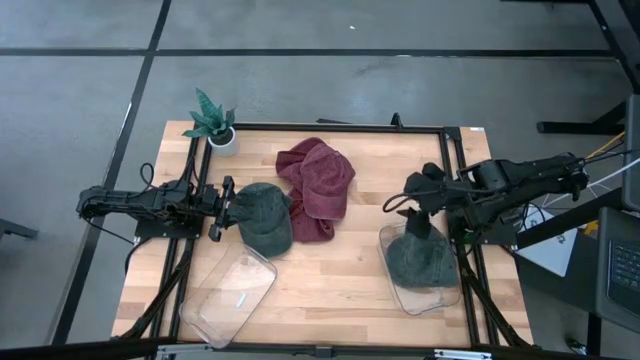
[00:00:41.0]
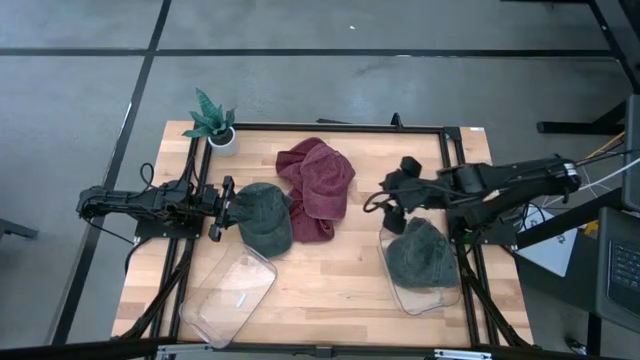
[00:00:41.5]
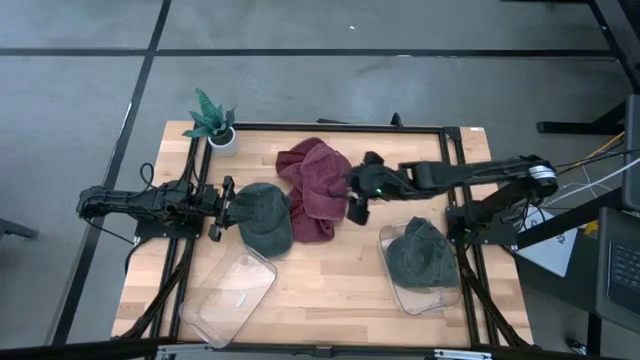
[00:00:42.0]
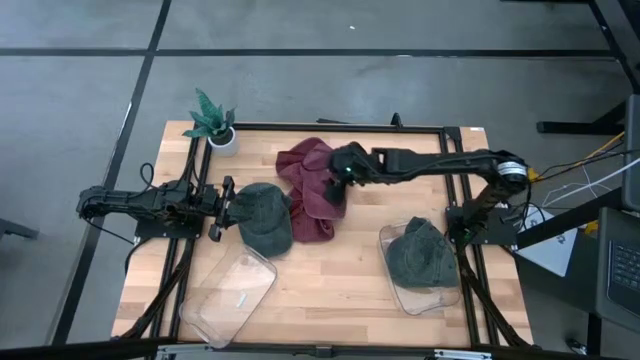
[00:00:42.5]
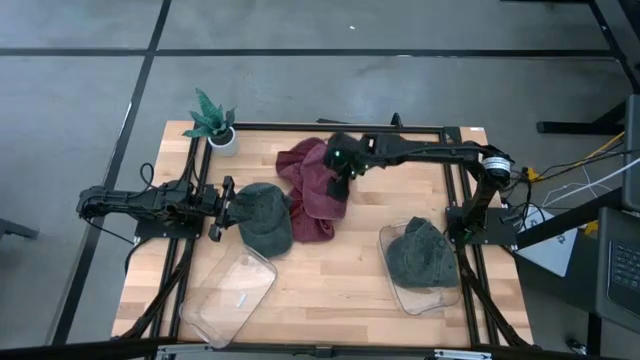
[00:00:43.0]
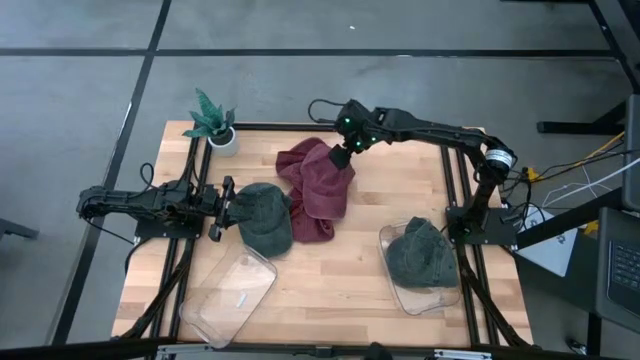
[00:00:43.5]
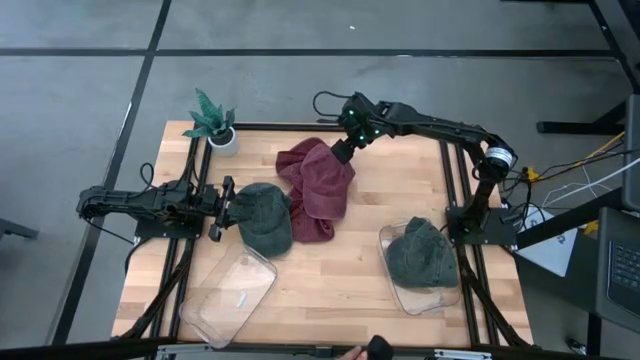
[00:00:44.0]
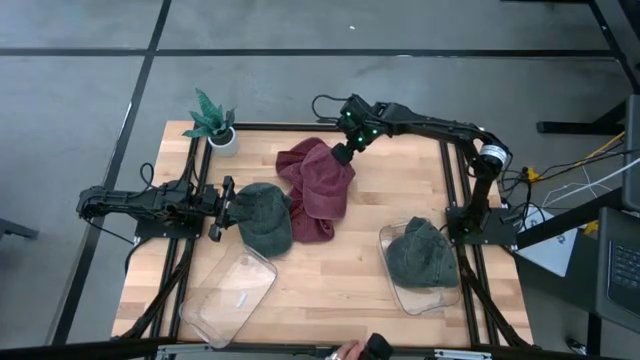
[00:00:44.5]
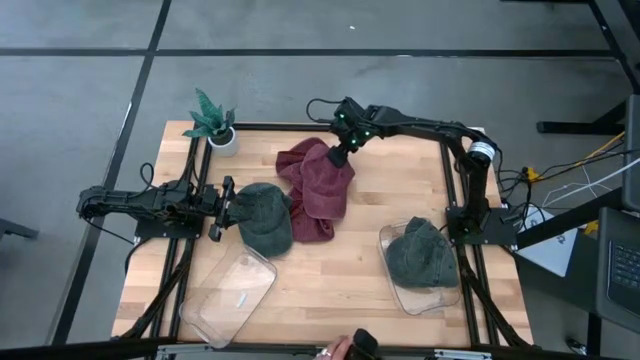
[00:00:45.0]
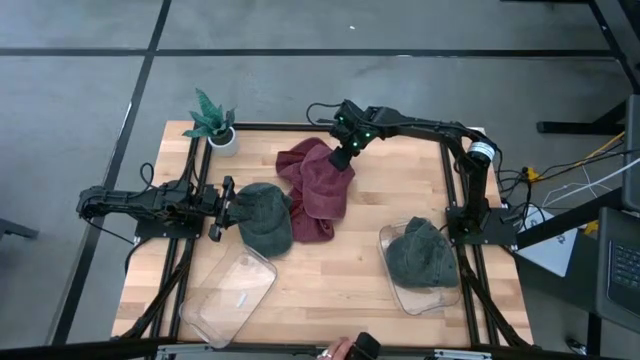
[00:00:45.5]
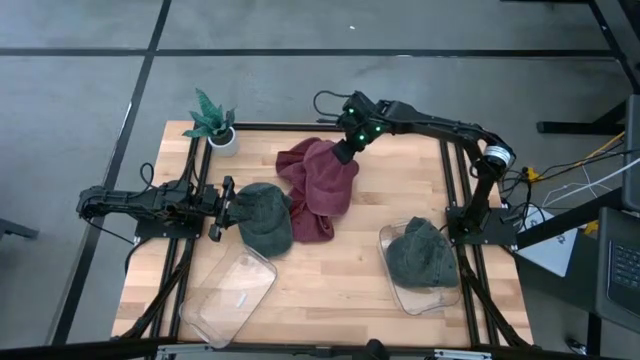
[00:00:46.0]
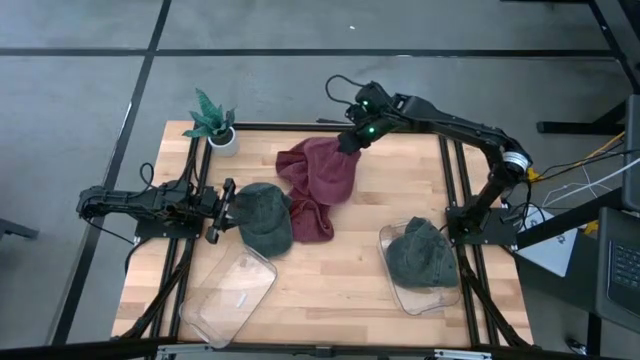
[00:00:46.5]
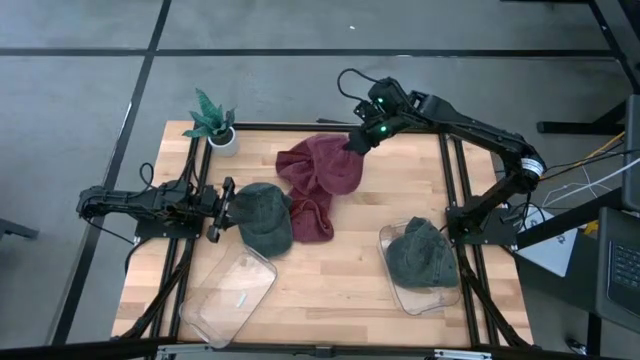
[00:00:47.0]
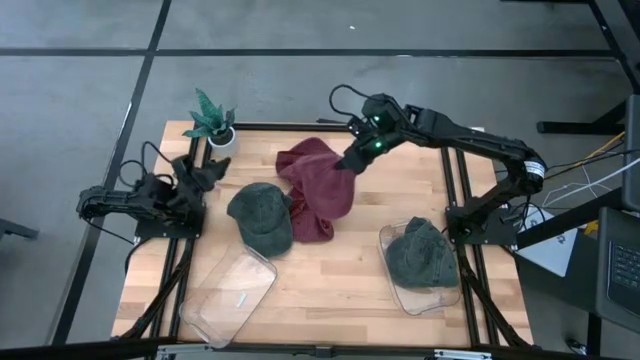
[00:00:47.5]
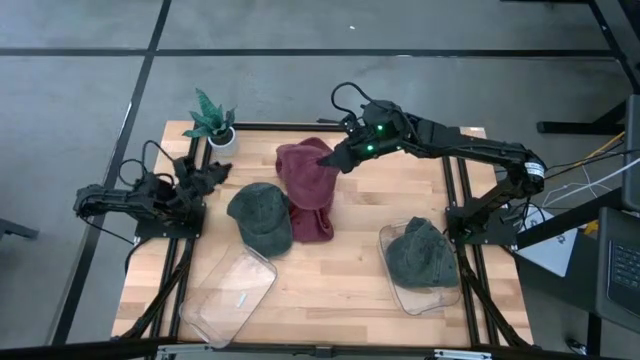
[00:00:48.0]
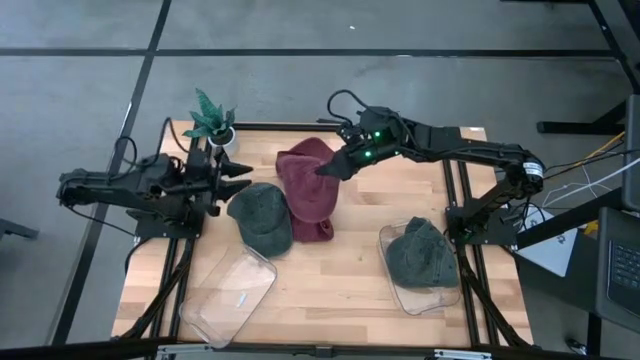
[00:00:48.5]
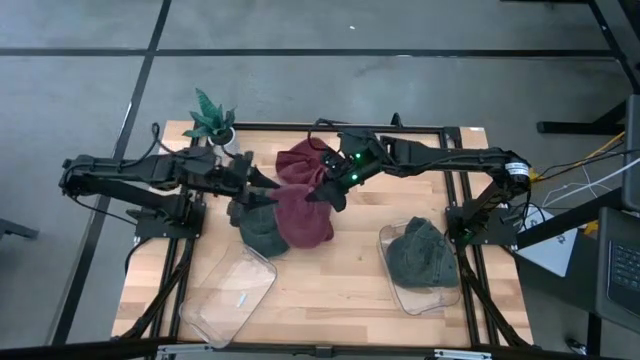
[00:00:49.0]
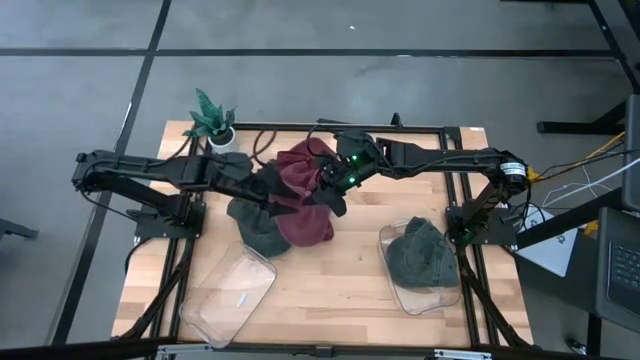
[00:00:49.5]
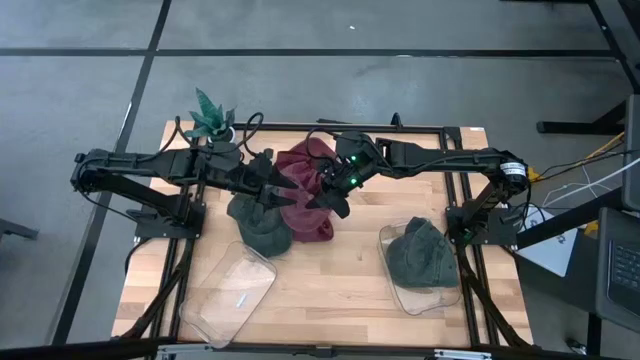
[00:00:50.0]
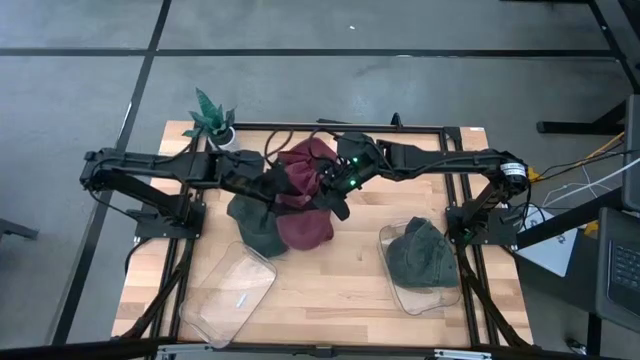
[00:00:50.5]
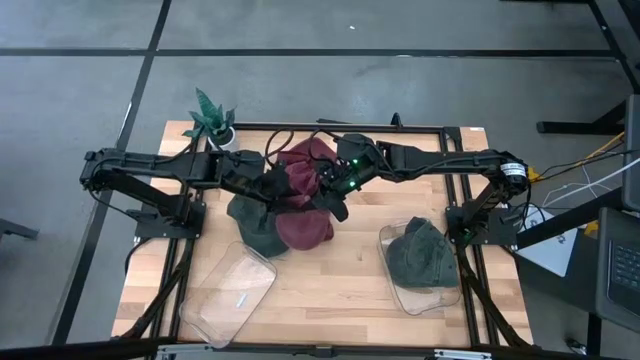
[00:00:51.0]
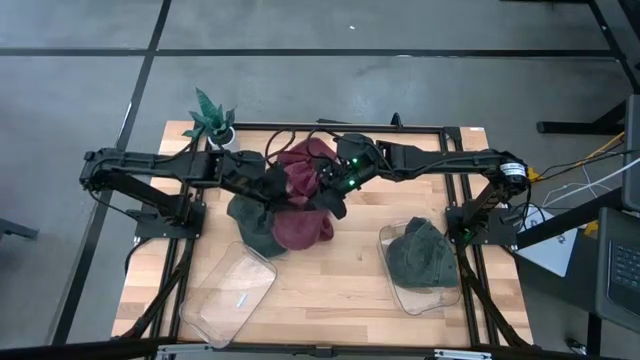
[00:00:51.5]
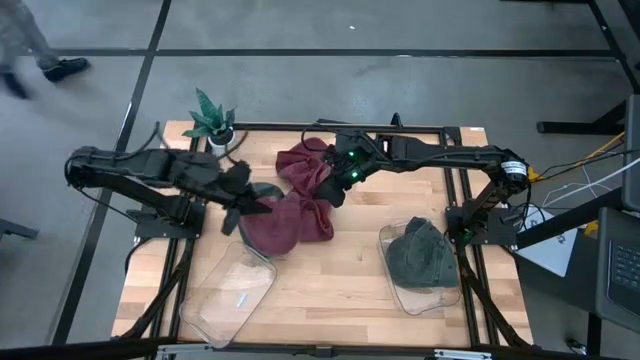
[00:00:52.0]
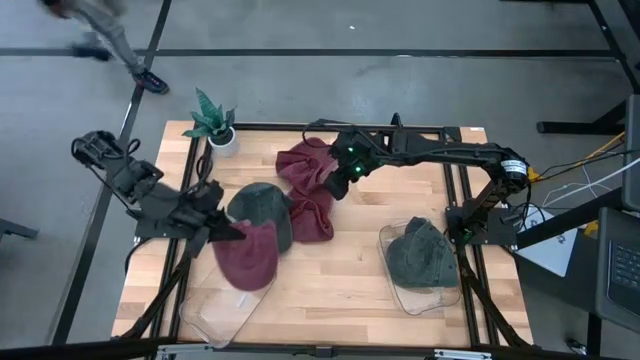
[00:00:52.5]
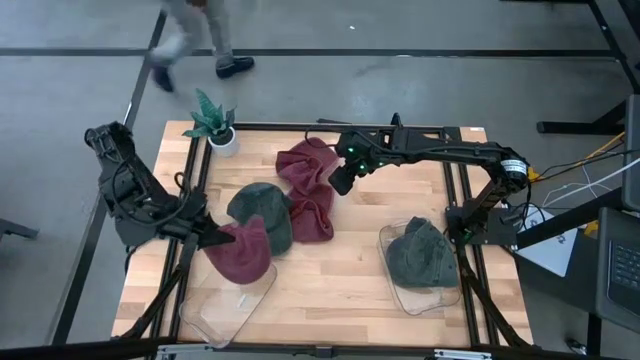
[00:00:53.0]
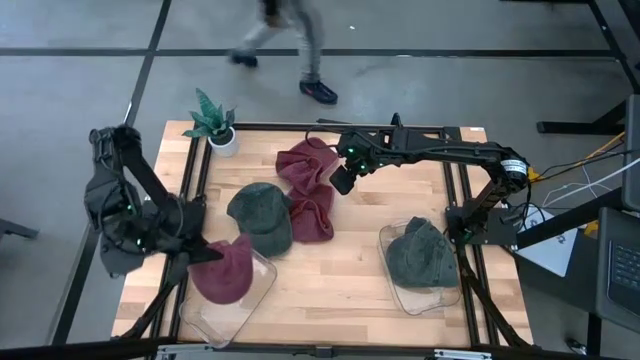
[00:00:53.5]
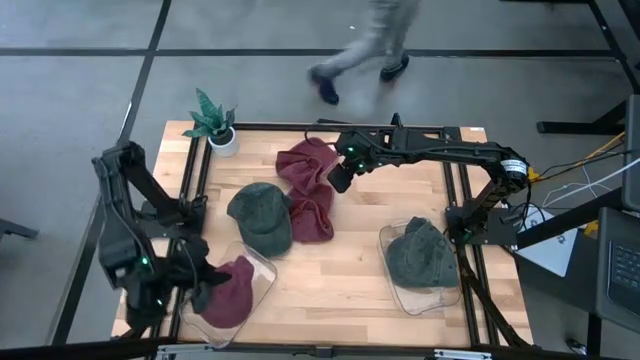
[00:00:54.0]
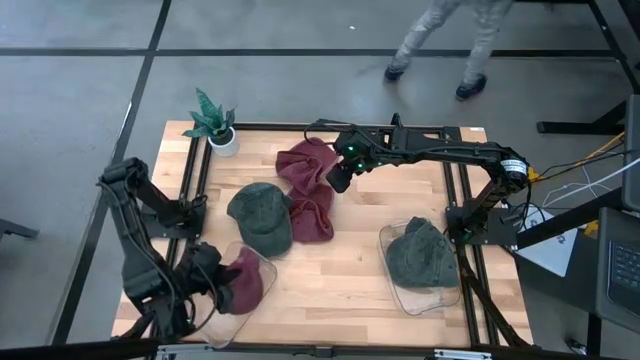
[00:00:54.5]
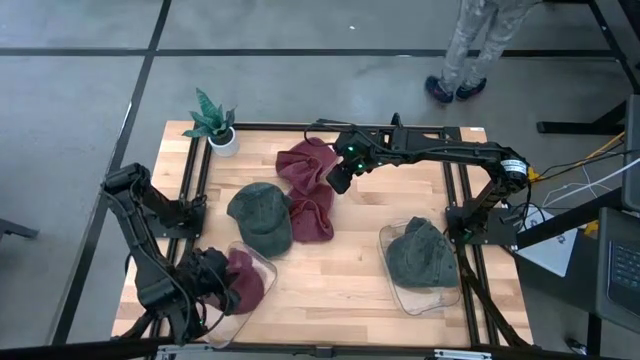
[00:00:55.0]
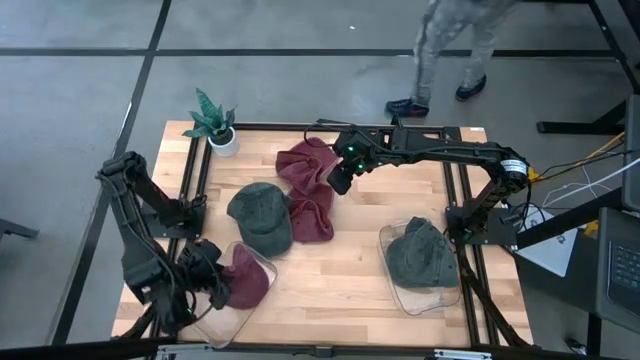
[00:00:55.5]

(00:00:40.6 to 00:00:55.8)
Task: Pick & Place hat
Put the right red cap into the left transparent bin

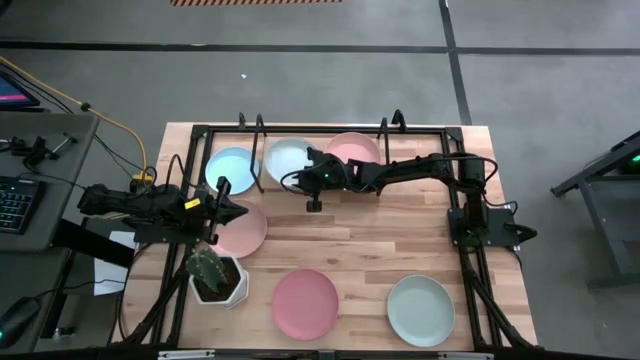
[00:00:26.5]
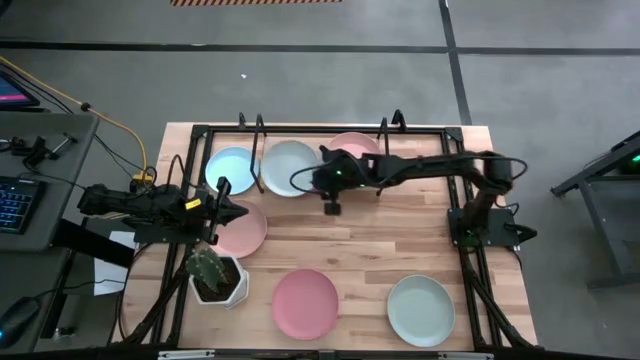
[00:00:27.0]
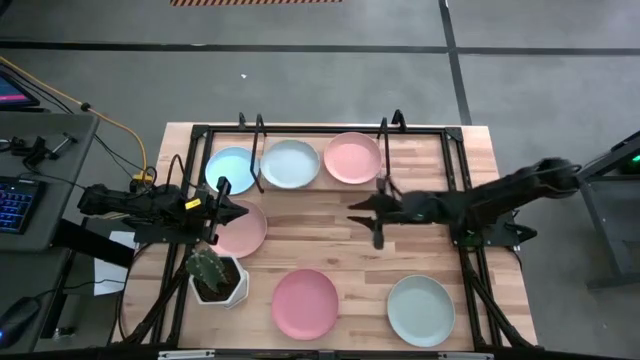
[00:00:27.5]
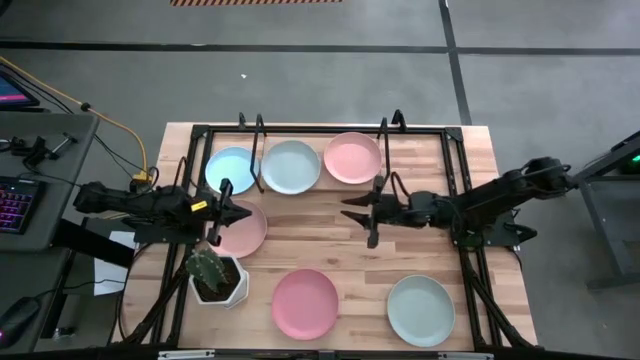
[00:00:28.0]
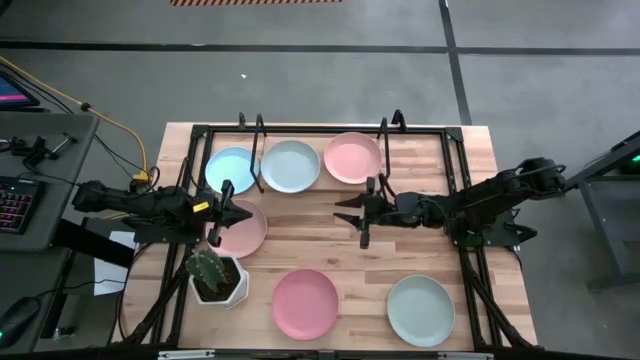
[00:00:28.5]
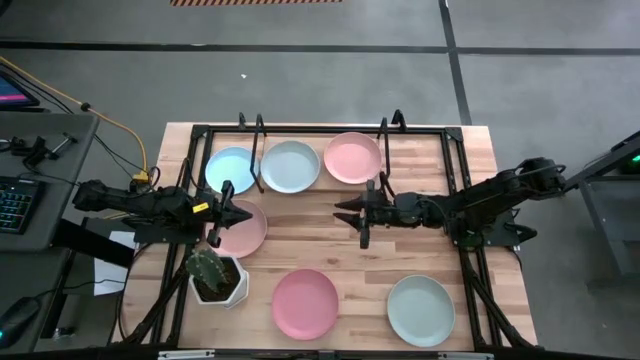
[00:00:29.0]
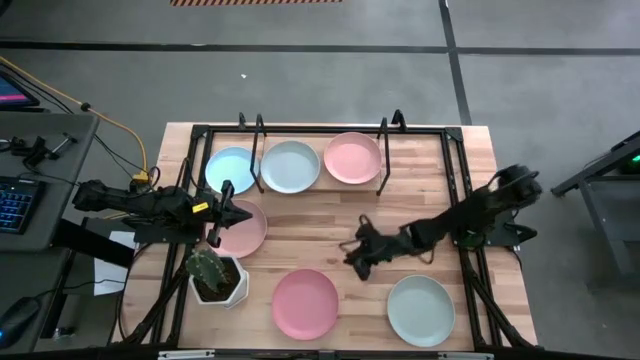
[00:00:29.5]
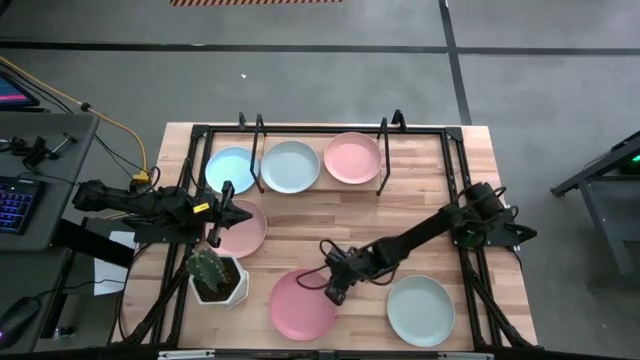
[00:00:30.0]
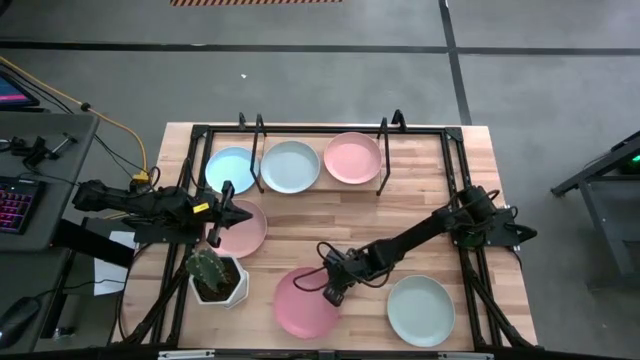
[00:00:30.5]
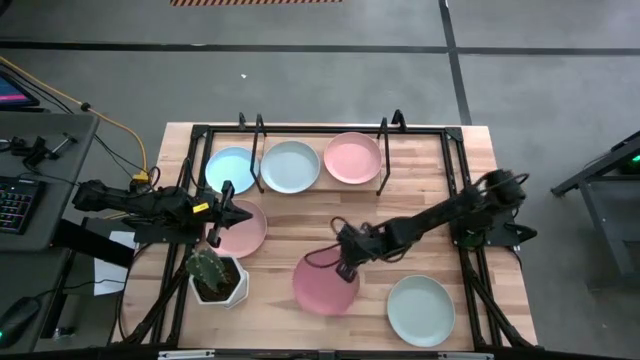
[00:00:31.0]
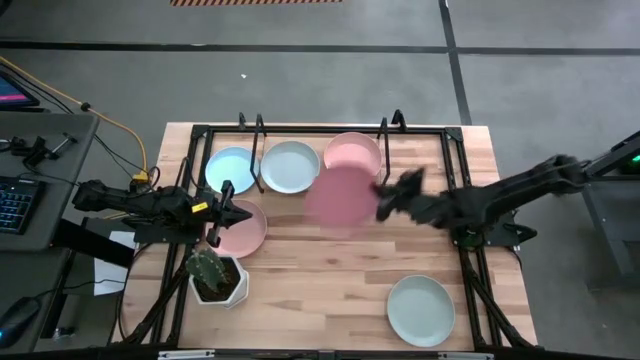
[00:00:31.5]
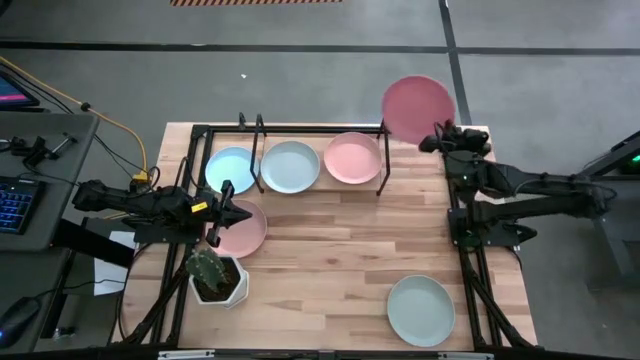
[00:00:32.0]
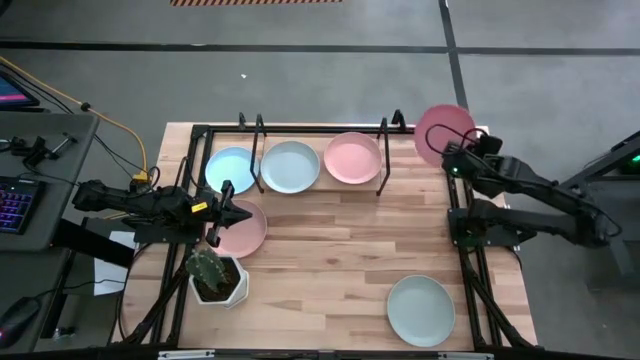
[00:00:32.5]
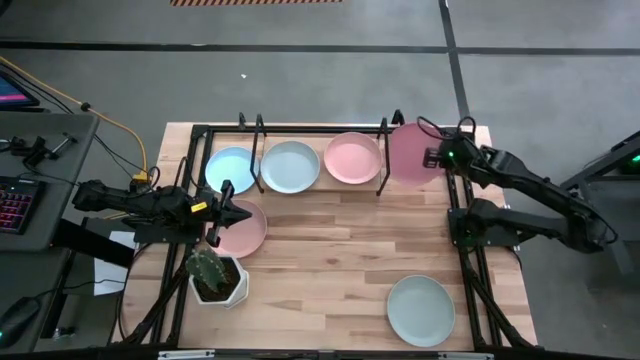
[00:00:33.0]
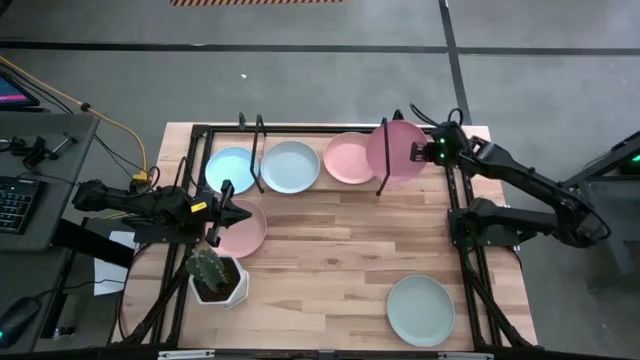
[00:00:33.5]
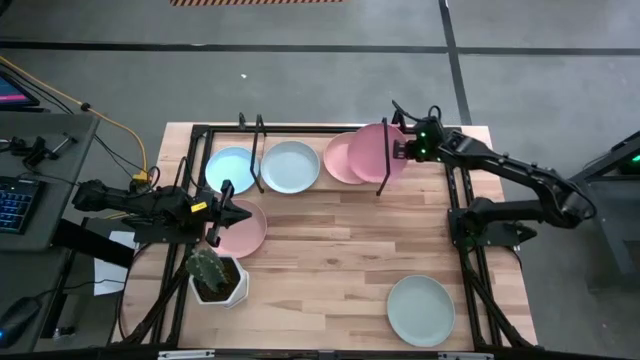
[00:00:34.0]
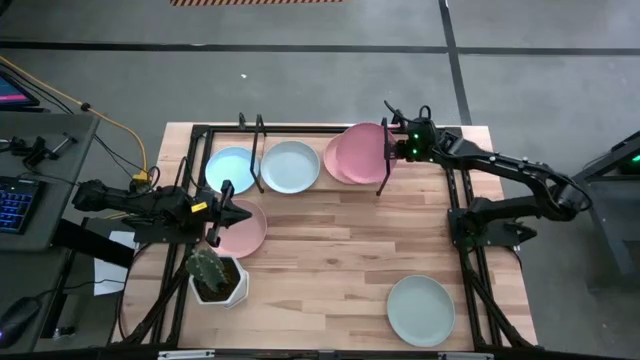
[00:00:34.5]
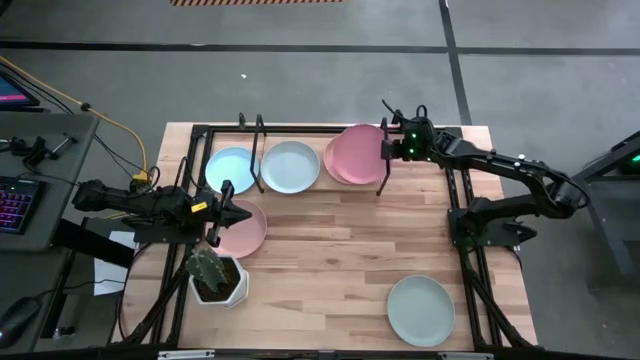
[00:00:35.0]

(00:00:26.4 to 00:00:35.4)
Task: Place and stack plates onto a shelf
Stack the pink plate on top of the light pink plate on the shelf
